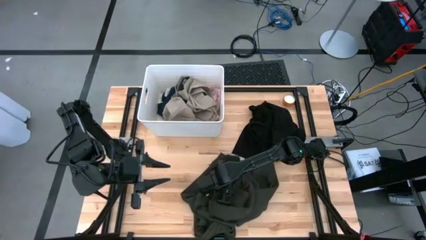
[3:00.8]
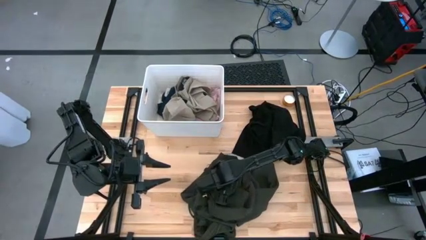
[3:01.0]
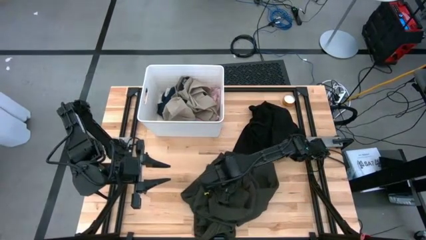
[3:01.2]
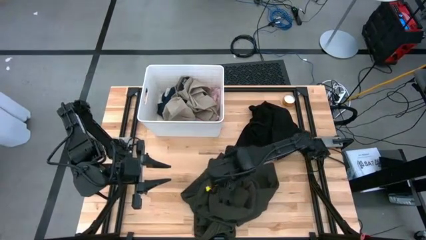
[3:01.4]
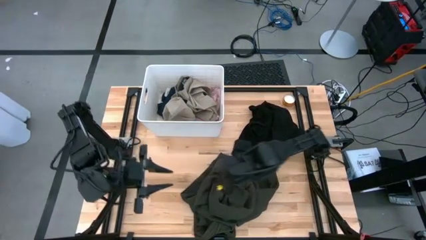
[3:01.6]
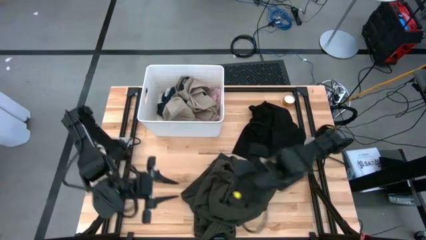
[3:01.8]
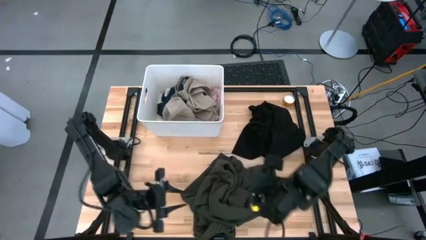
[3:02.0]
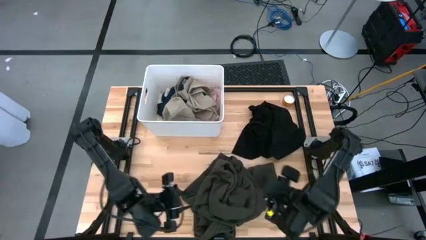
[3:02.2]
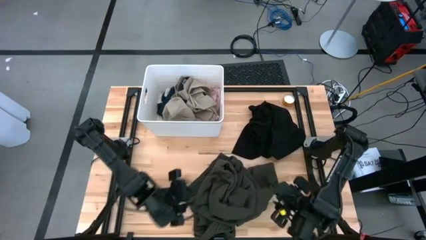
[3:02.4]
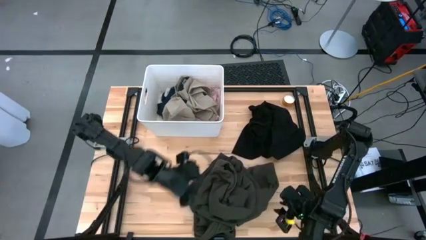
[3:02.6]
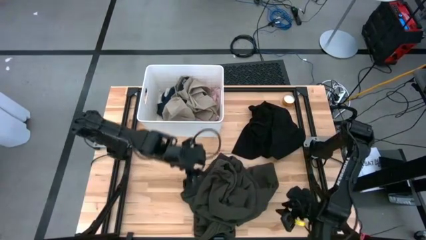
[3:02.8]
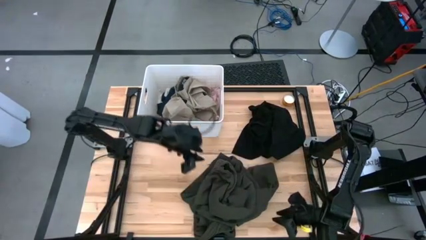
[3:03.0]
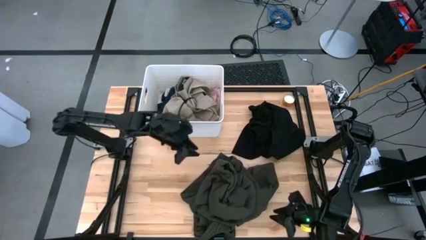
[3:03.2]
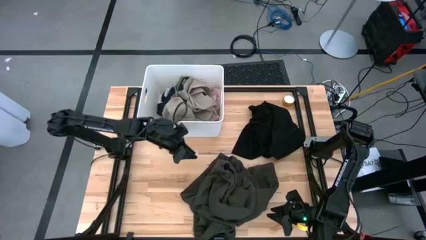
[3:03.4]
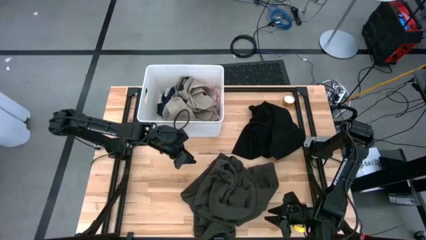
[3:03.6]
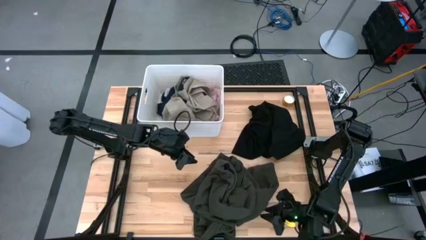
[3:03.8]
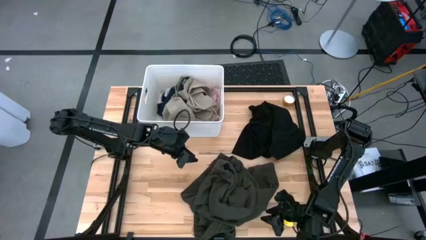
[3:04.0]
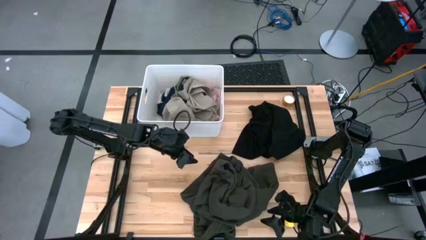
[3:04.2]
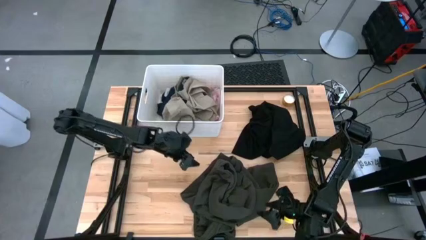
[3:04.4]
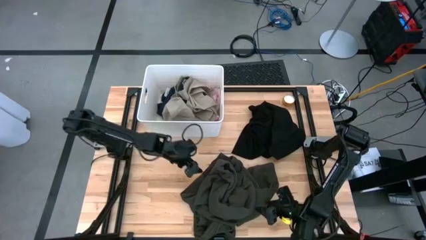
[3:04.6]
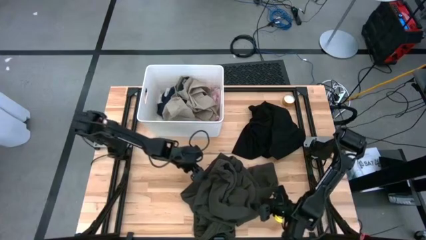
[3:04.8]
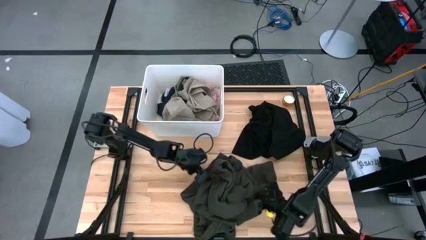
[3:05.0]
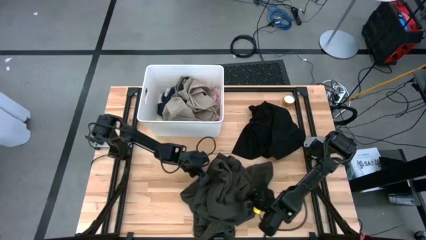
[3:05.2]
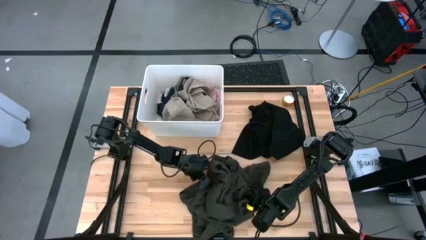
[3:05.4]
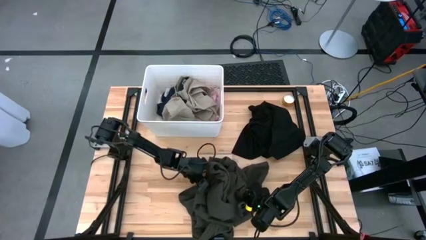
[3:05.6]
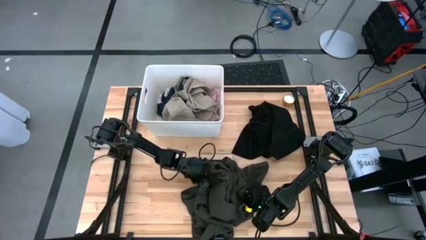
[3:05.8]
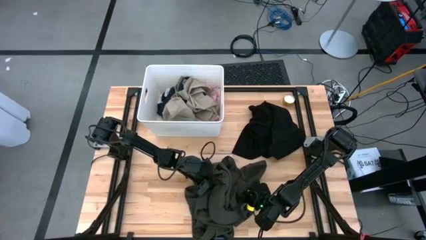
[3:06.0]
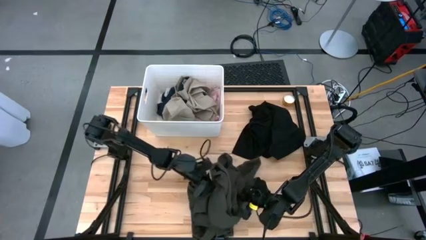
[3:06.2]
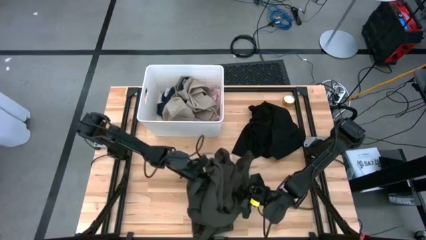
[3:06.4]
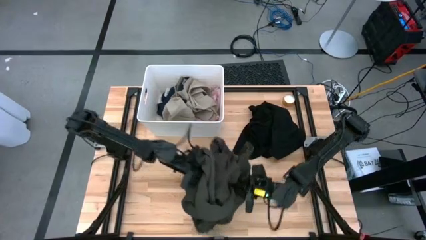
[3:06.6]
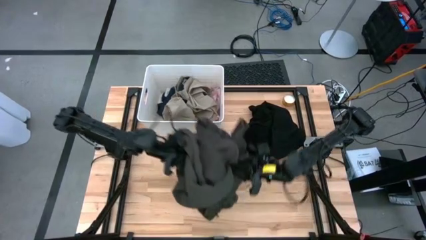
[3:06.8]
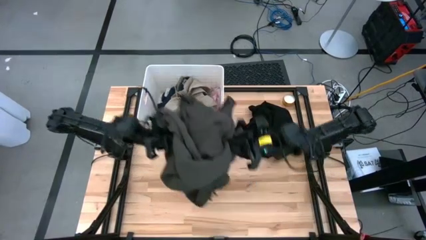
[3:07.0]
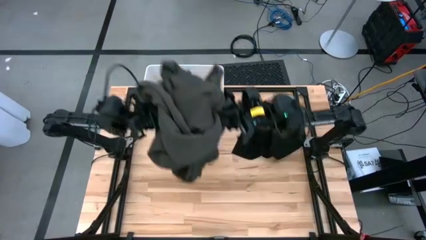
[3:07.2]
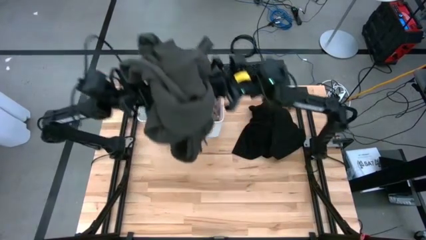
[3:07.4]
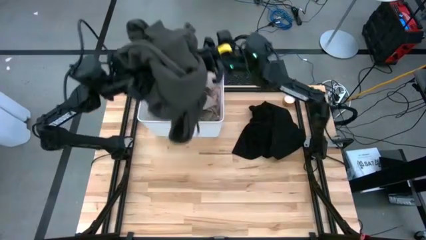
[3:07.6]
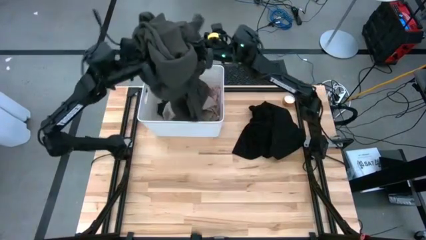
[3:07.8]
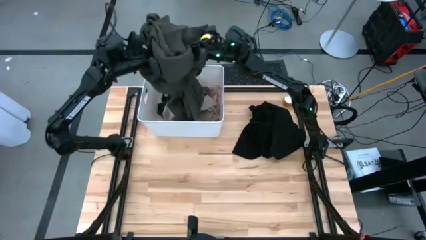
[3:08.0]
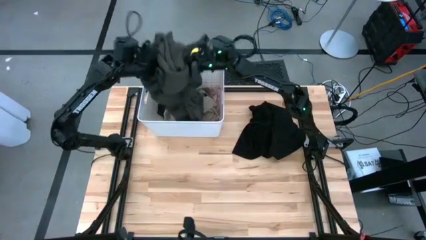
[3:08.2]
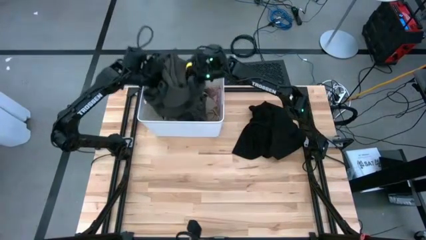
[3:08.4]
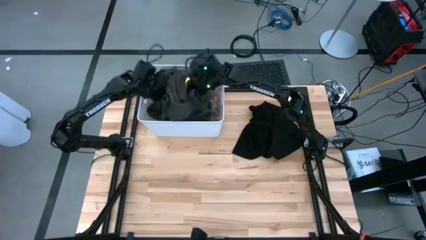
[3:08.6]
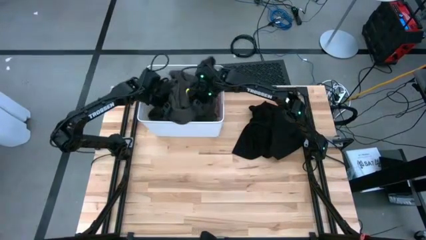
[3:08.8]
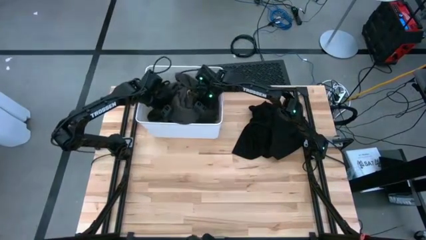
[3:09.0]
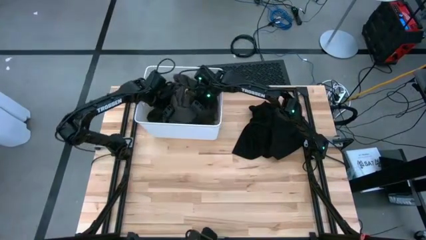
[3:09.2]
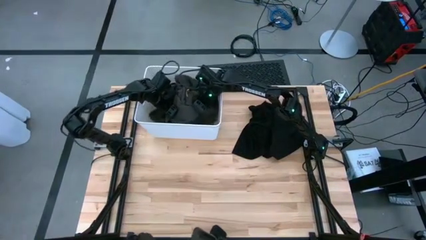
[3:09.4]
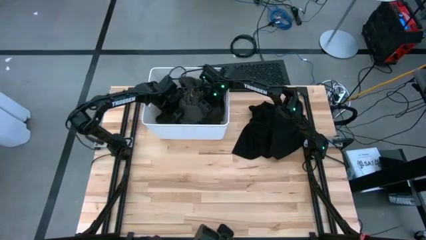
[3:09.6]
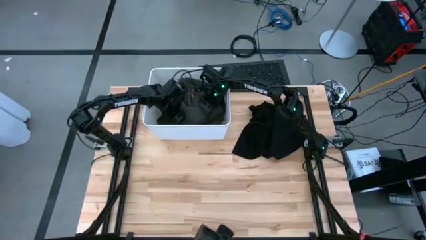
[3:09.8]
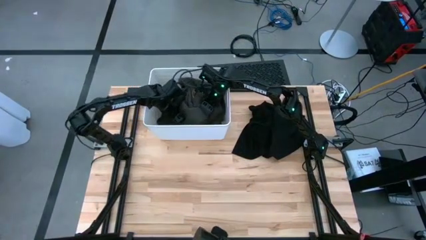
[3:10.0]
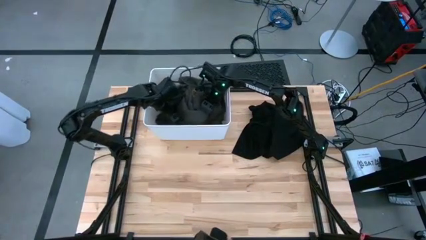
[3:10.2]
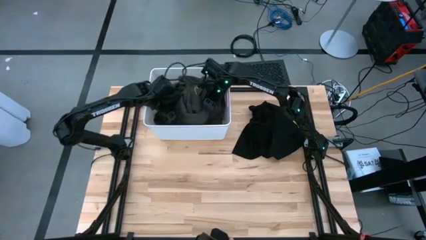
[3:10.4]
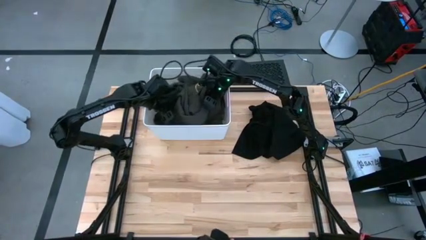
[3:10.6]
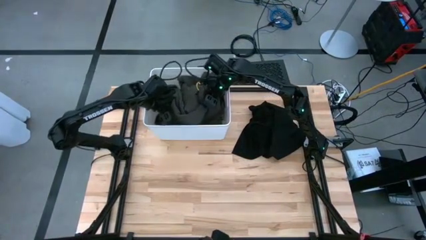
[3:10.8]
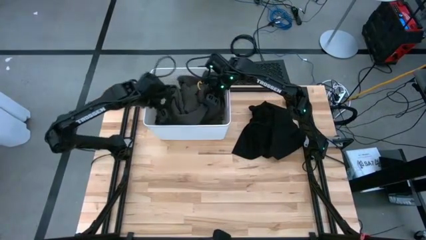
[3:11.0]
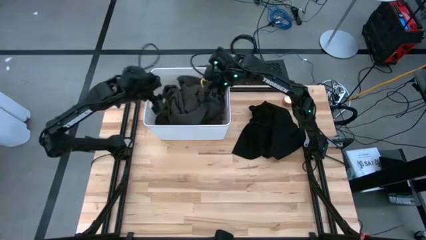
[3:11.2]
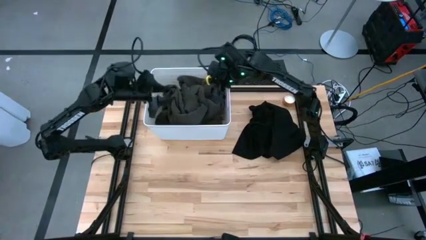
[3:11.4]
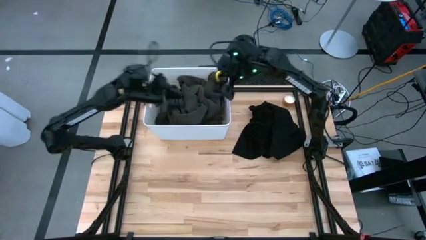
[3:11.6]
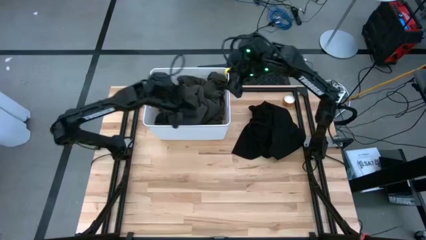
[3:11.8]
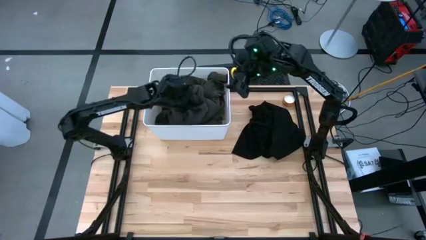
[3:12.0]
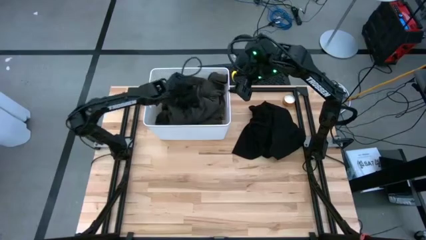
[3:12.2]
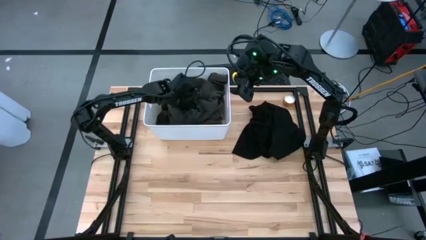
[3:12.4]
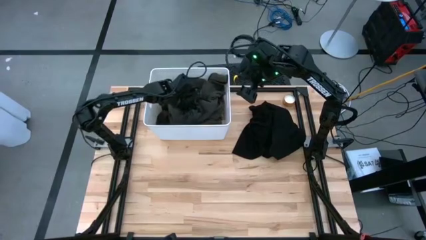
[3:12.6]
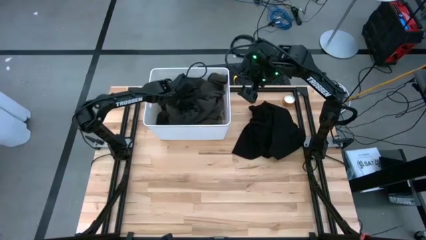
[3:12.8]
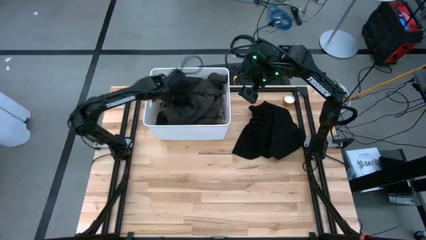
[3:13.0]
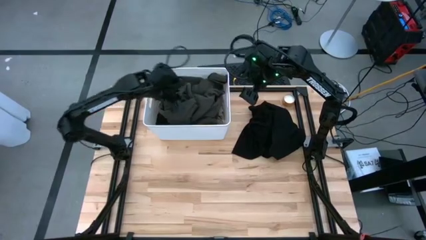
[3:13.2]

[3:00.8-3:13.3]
Task: Sort clothes
Put the black hoodie into the white laundry bin

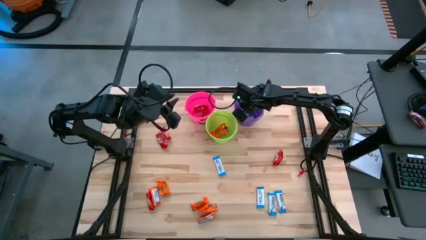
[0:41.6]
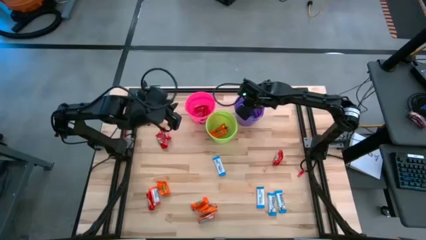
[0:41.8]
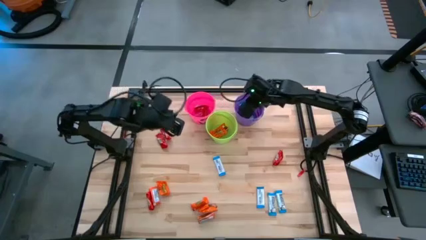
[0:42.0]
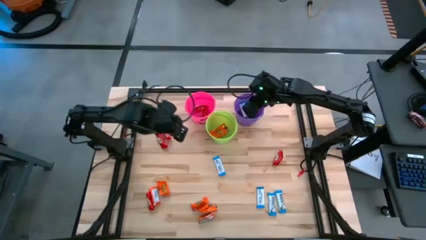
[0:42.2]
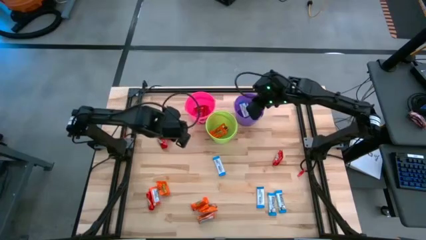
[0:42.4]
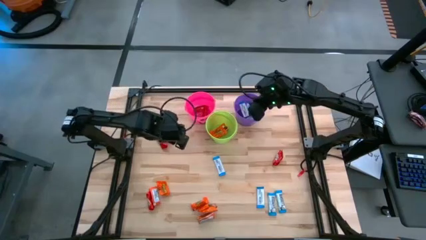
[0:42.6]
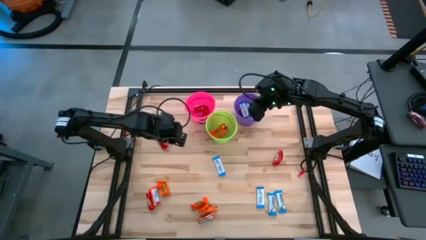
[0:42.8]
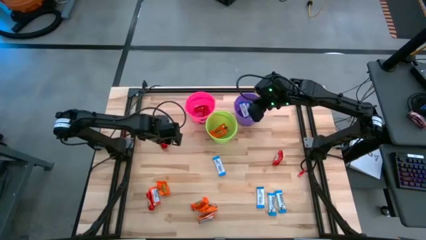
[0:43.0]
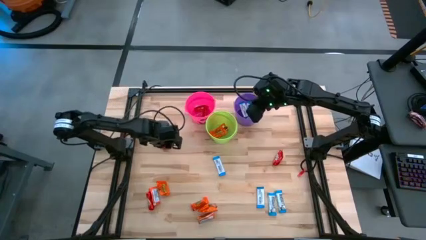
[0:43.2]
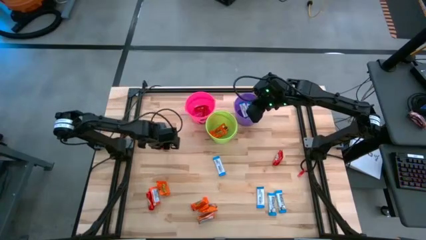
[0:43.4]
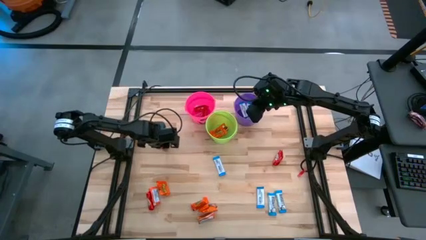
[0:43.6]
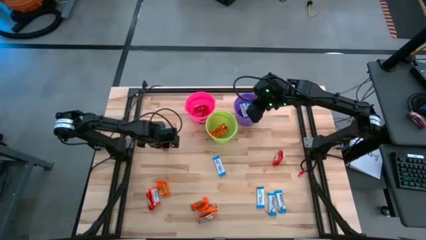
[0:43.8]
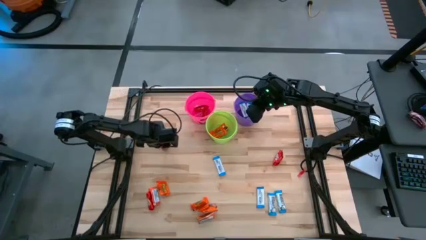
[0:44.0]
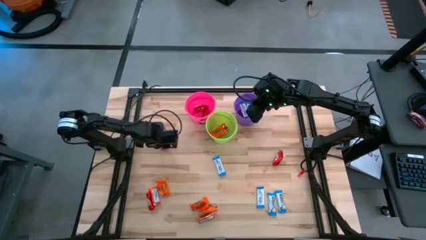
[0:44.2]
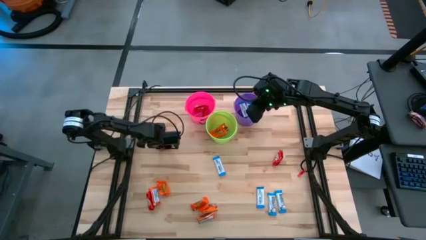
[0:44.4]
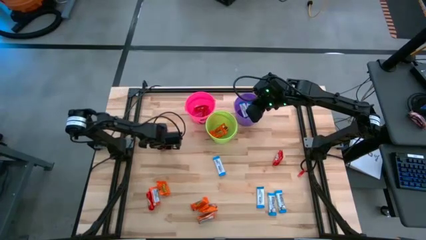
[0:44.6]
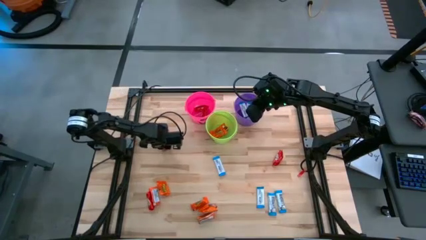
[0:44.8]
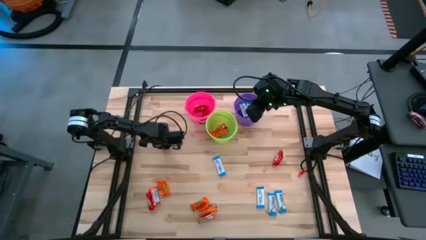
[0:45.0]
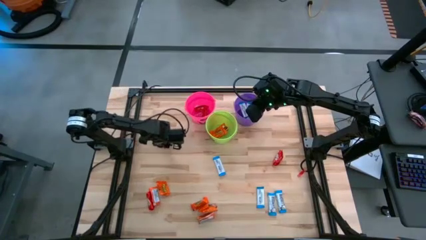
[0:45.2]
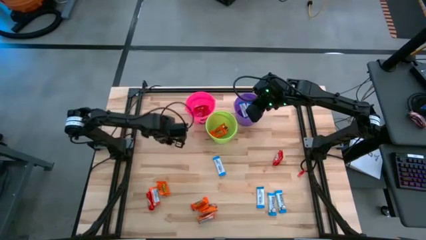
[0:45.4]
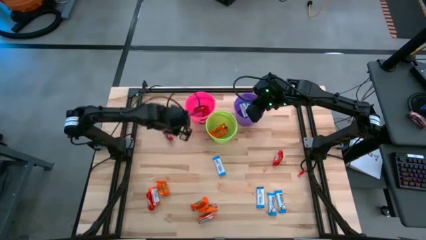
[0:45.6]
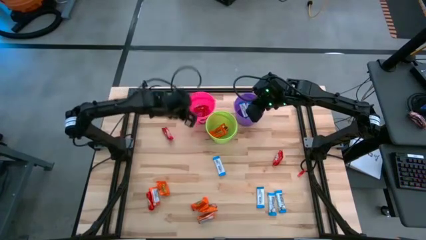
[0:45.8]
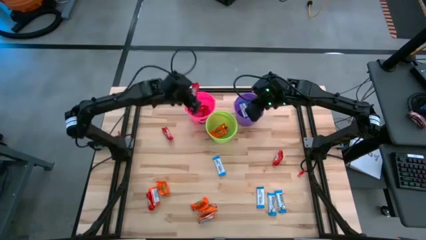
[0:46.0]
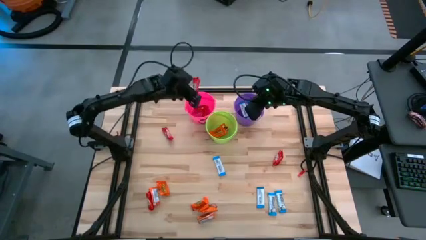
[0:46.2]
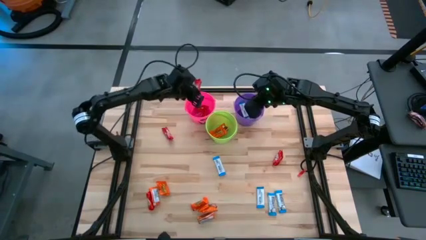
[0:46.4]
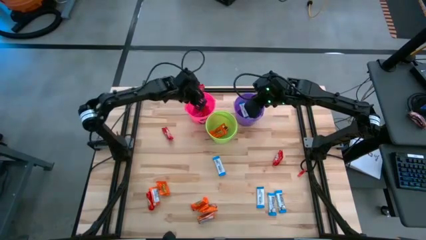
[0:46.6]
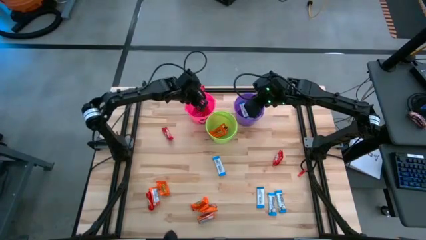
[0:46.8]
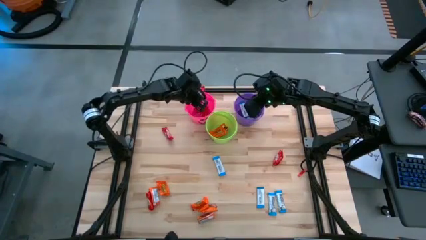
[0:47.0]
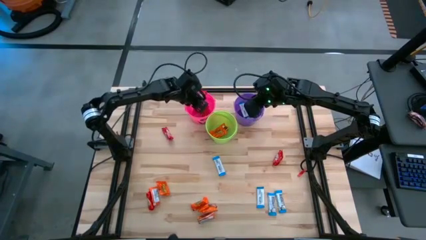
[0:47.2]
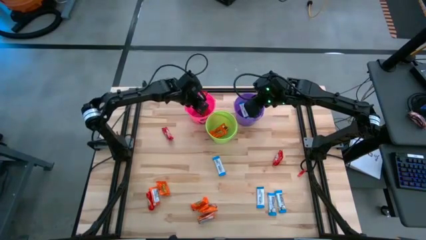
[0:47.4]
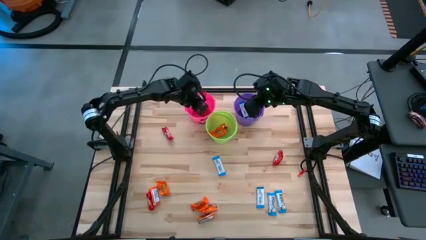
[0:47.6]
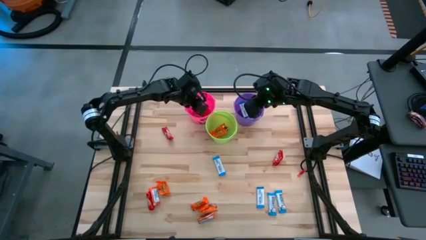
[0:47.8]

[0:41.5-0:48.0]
Task: Sort candy
Put the red candy into the pink bin
